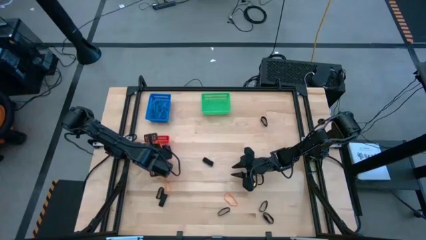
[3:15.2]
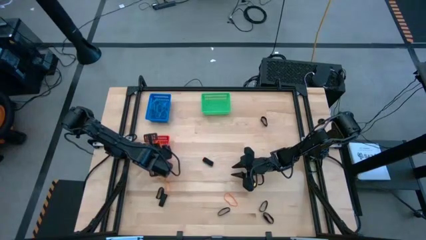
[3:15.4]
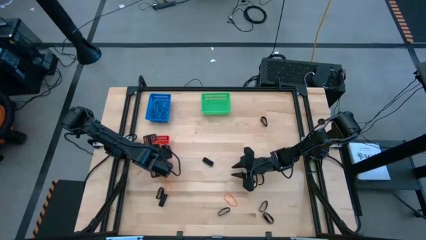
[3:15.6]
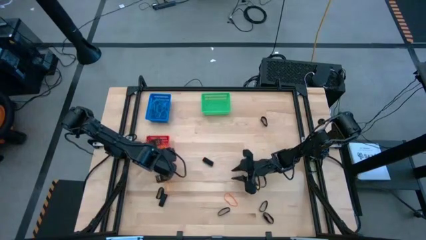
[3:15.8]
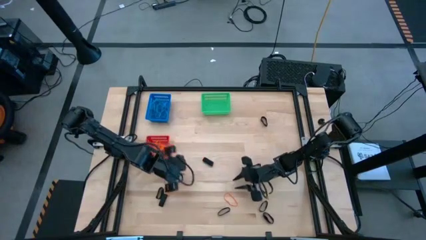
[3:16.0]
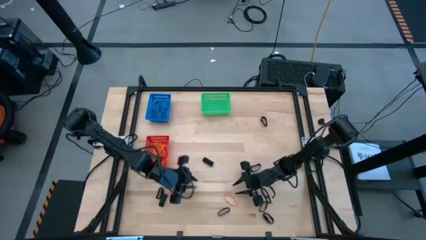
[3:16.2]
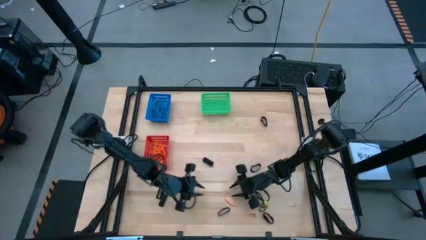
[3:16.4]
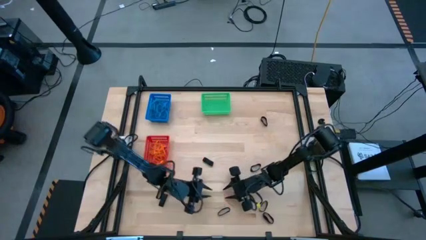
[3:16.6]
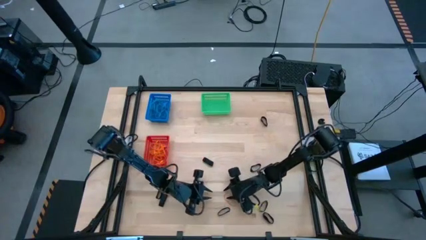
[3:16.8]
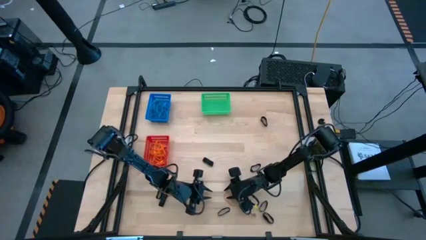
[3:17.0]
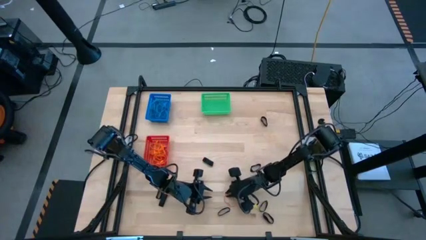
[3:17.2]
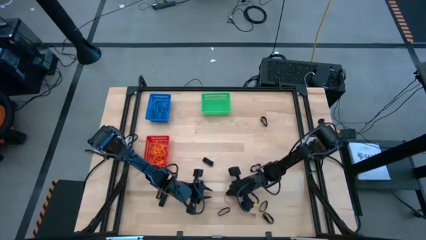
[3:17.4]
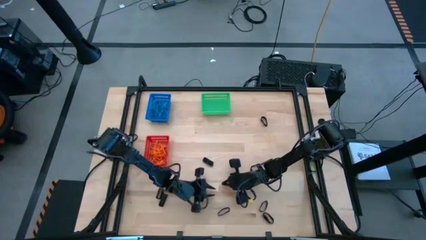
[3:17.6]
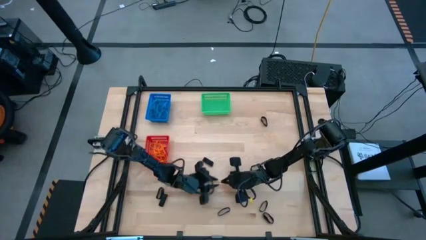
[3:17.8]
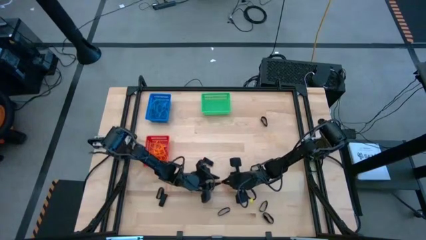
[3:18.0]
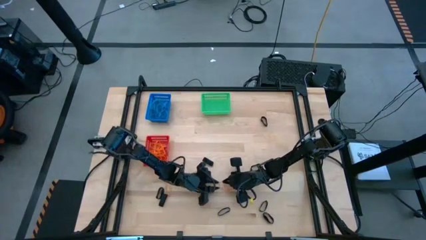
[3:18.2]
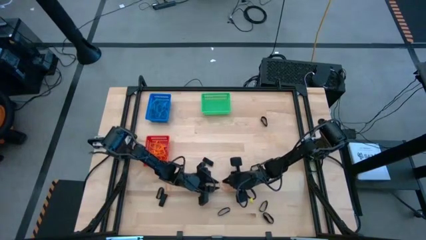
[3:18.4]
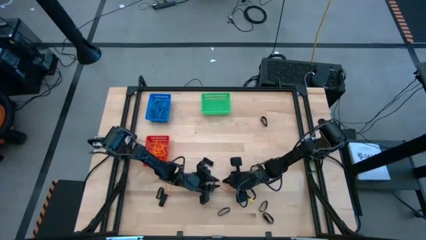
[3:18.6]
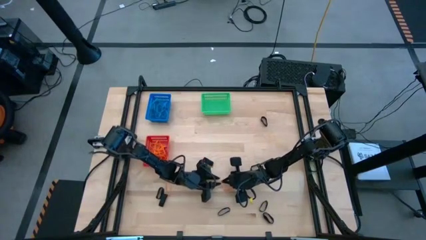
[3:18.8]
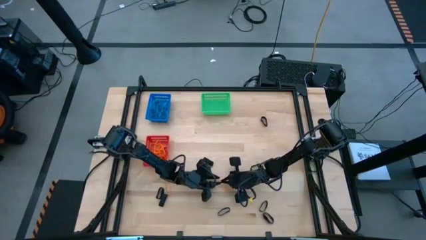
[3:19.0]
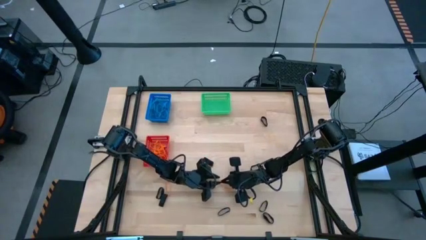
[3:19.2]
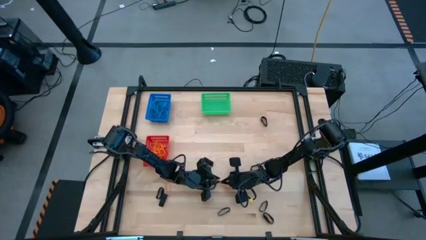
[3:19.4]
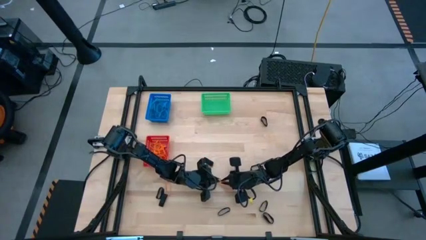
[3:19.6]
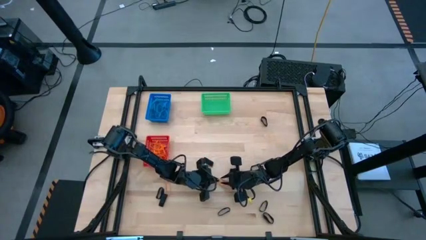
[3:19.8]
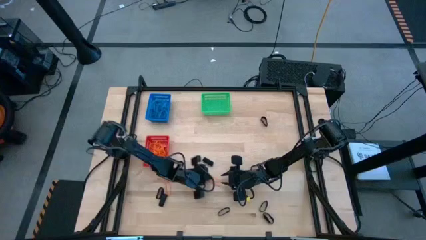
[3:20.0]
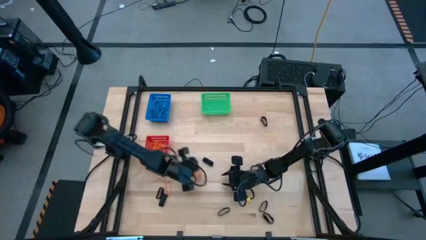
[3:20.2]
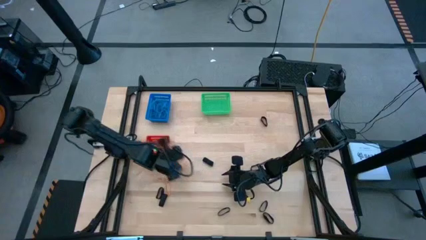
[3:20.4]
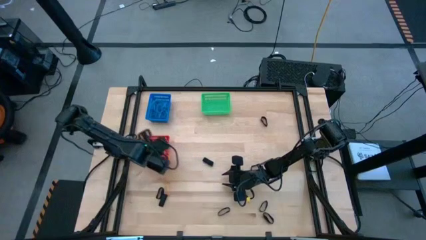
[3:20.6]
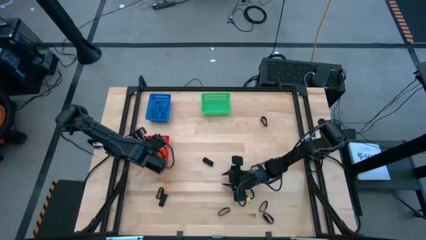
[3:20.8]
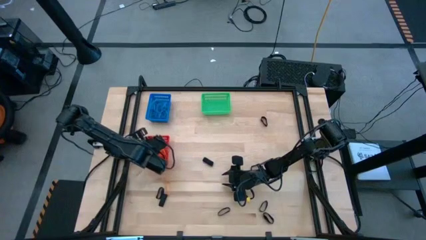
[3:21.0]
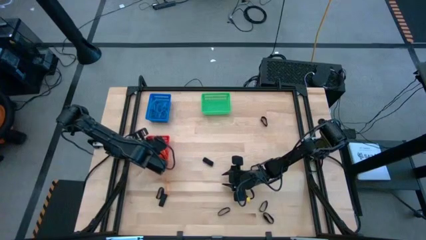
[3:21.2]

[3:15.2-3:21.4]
Task: Sort rubber bands into baskets
Put the orange rubber band into the red bin

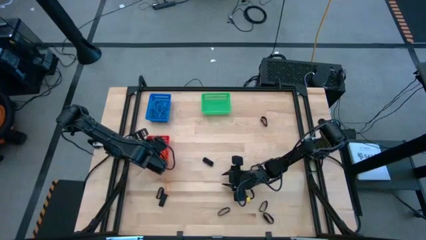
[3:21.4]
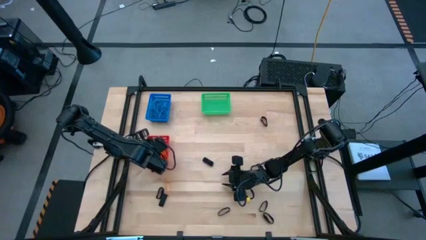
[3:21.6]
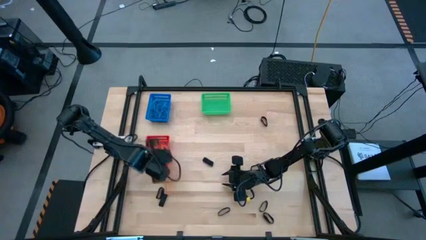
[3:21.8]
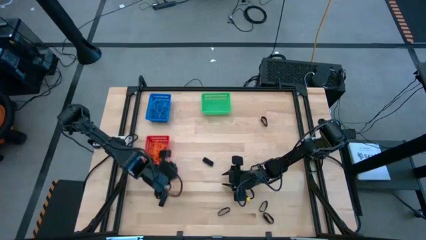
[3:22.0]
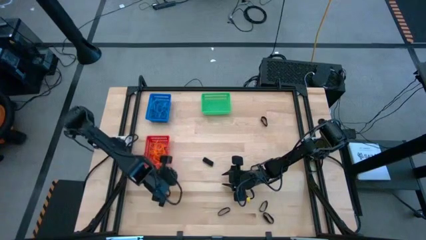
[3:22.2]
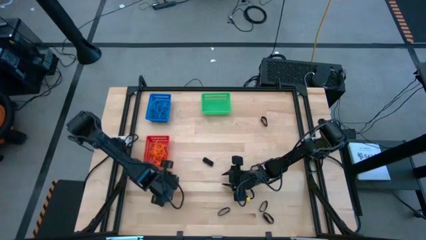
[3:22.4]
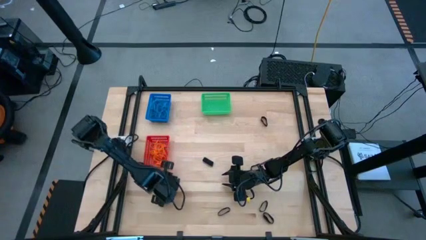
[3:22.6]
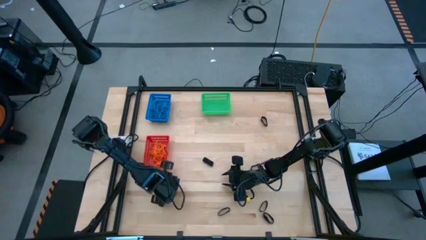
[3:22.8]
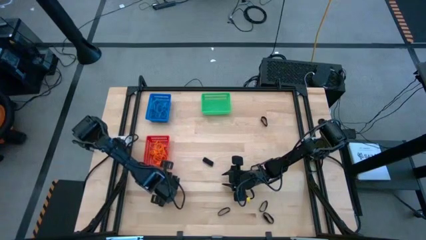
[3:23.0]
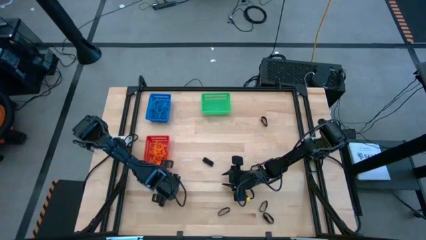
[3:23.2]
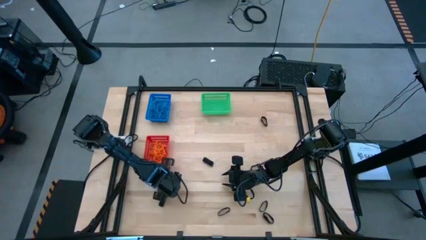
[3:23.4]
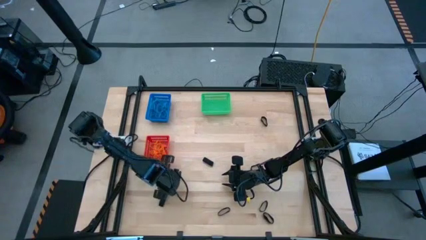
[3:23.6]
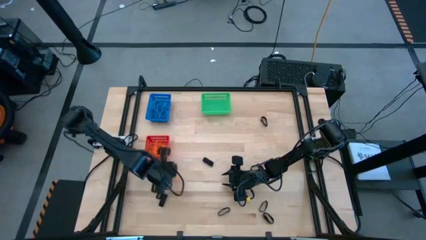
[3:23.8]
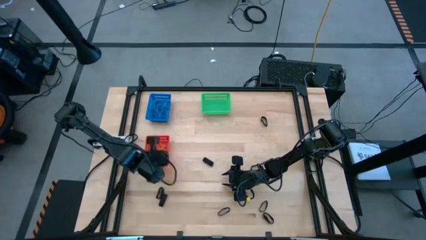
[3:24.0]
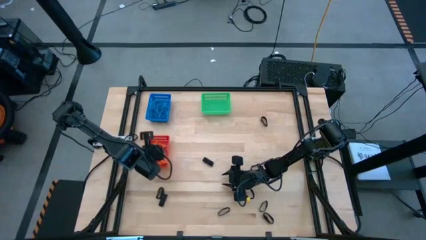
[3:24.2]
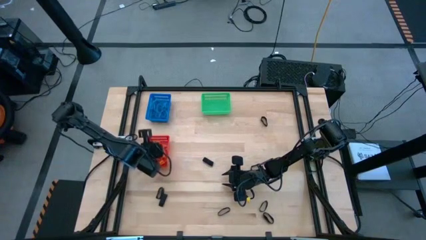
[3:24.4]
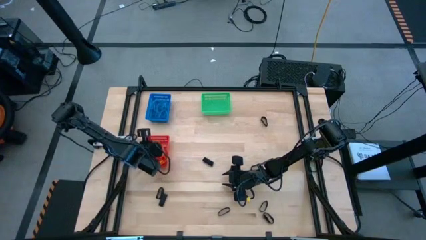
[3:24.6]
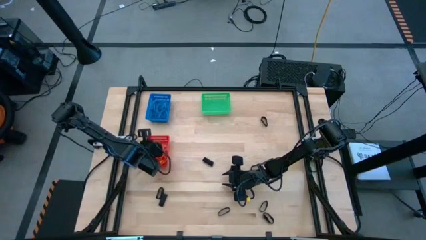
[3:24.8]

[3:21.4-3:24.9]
Put the orange rubber band into the red bin

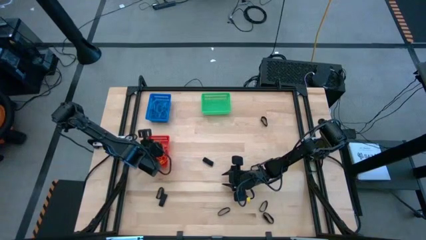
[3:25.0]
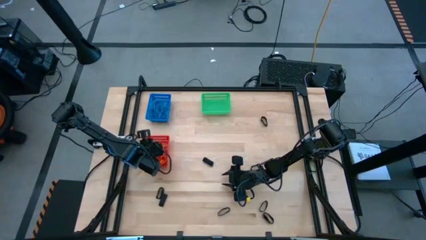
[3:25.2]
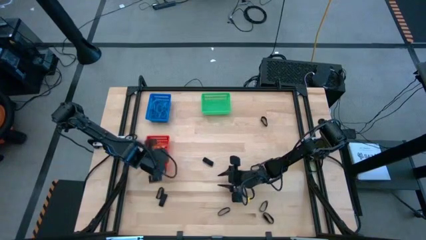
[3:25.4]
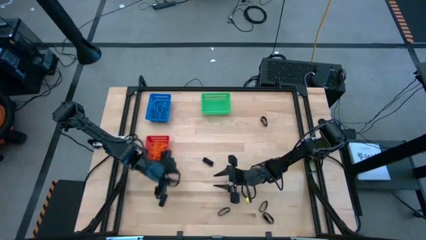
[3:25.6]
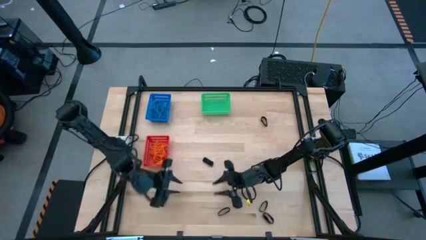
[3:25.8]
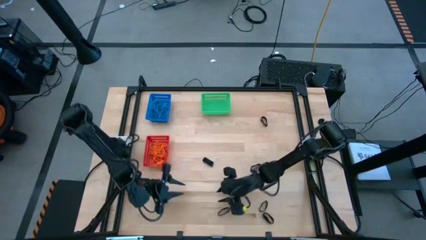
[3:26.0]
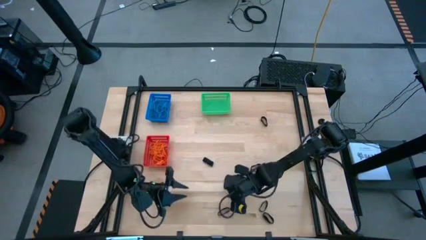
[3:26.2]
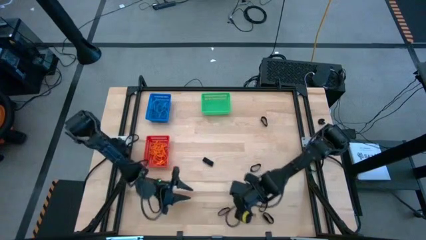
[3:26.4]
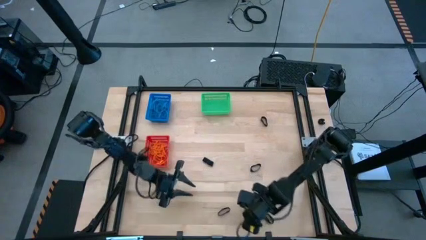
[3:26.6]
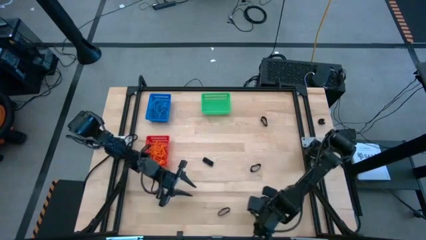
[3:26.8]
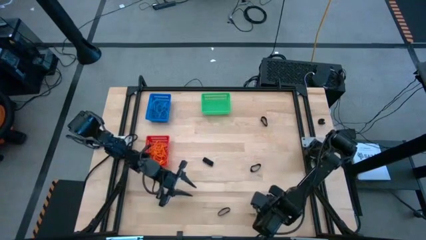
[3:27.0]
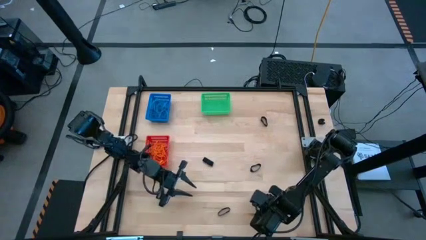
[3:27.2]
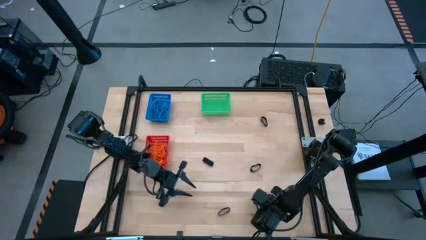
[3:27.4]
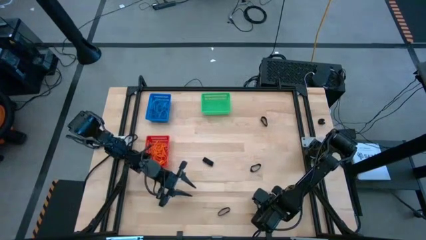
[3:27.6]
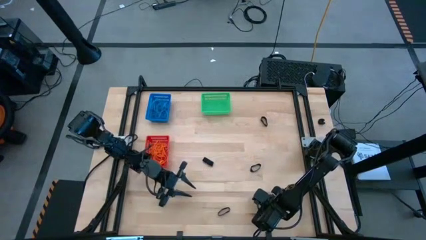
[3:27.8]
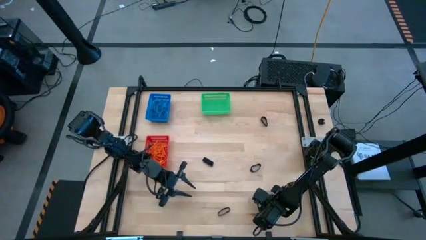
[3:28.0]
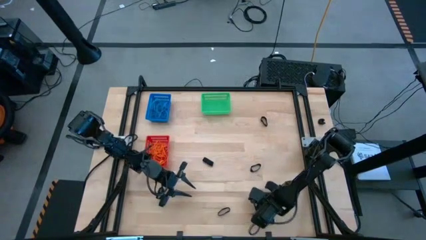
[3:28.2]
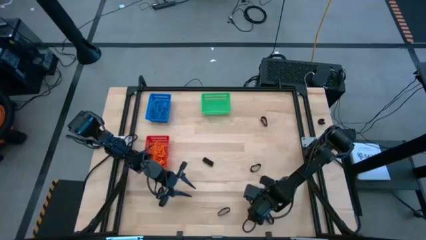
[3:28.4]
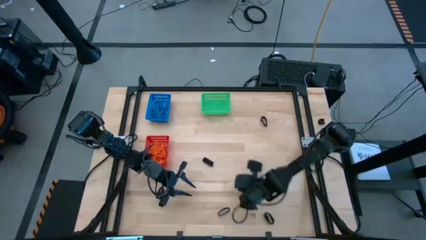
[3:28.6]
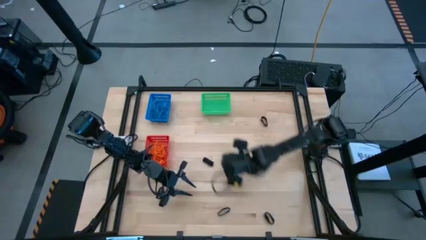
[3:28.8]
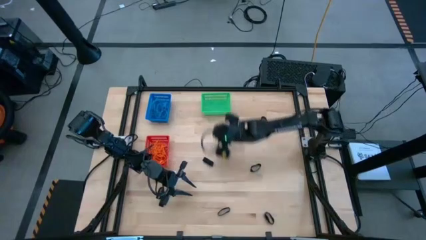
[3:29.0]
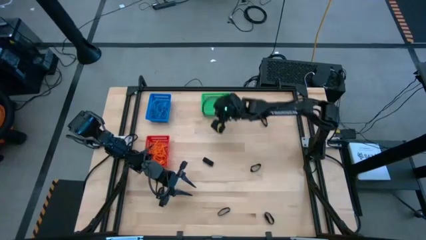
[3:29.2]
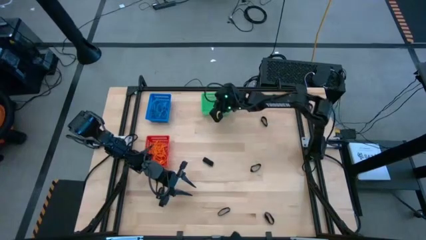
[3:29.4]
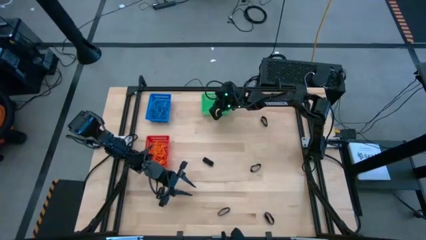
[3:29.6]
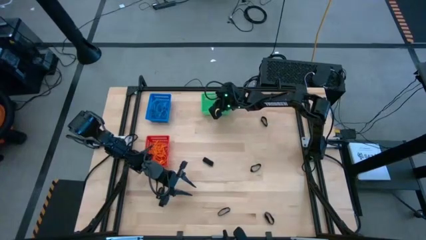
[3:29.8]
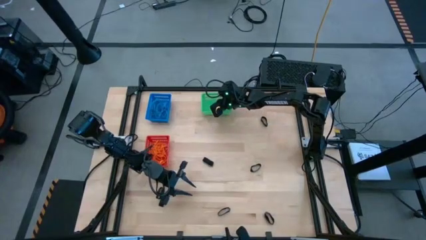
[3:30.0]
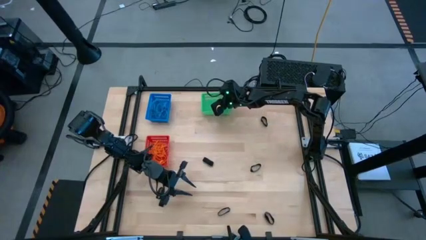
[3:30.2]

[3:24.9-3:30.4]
Put the black rubber band into the green bin

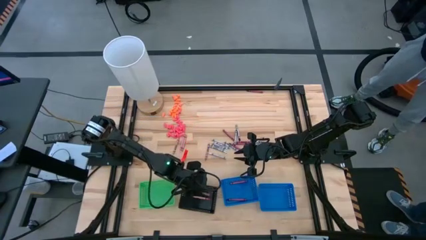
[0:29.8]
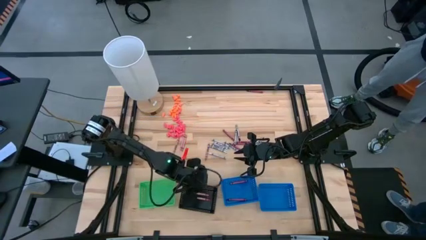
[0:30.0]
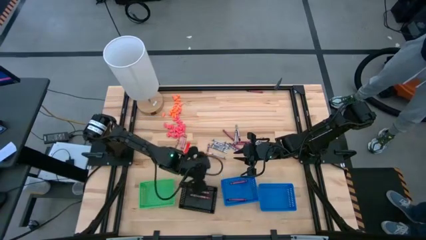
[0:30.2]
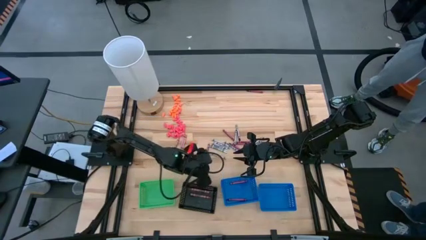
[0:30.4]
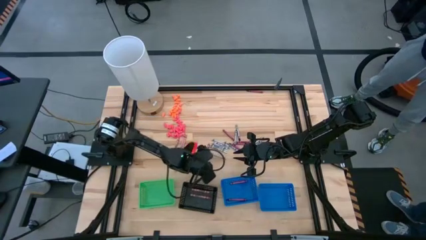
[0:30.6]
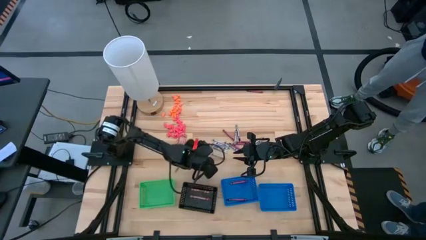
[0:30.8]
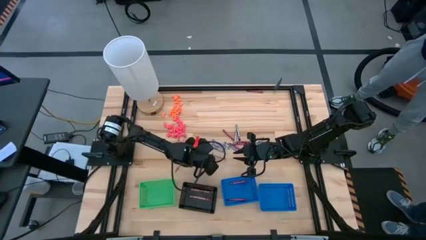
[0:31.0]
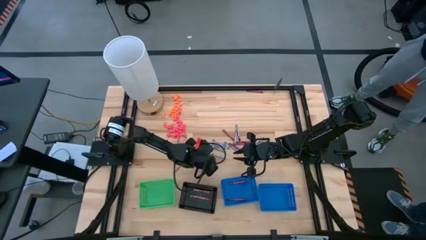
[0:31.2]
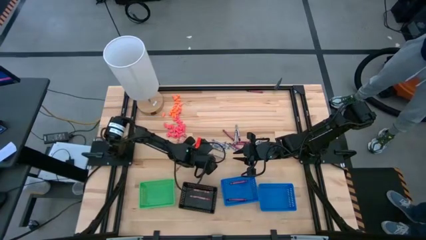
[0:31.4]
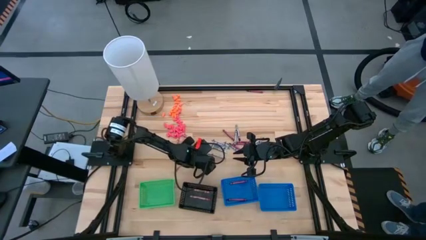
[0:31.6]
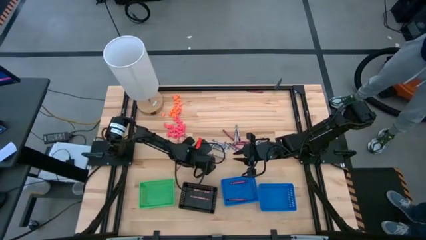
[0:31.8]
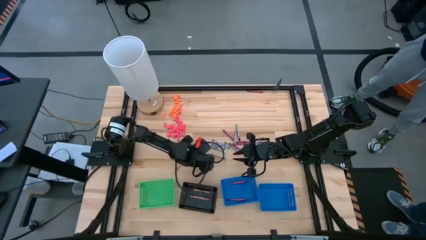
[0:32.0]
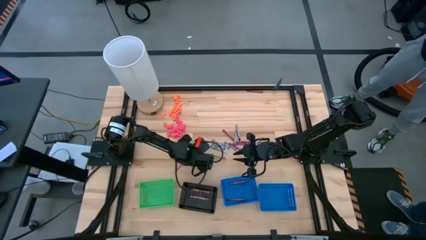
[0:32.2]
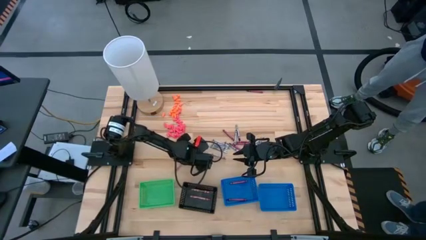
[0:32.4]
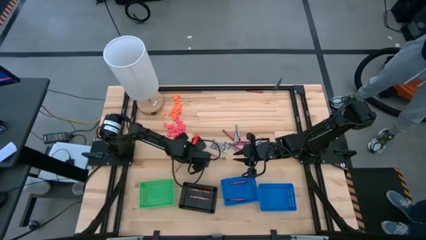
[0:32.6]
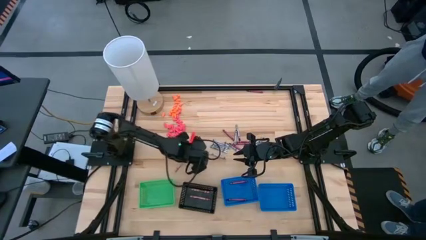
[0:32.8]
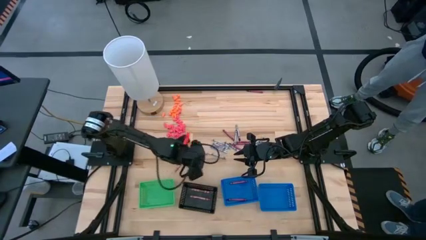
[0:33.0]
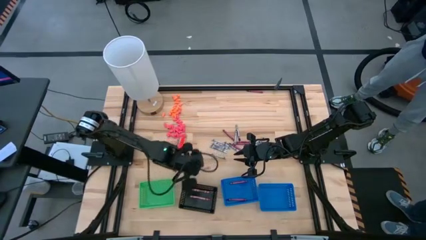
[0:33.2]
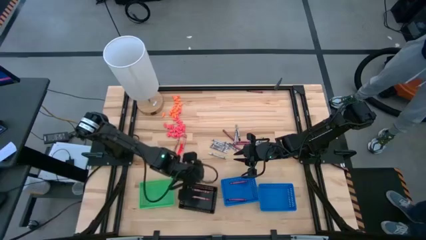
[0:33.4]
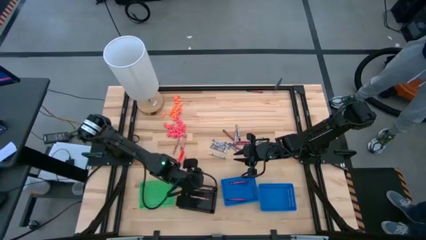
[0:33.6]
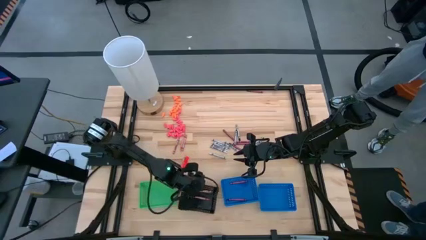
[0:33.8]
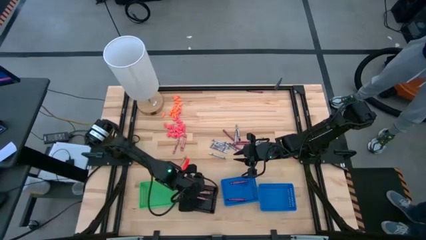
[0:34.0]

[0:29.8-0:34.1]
Task: Sort crayons
Put the pink crayon into the black bin
